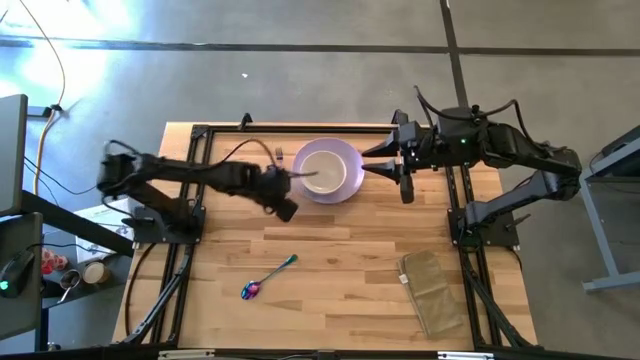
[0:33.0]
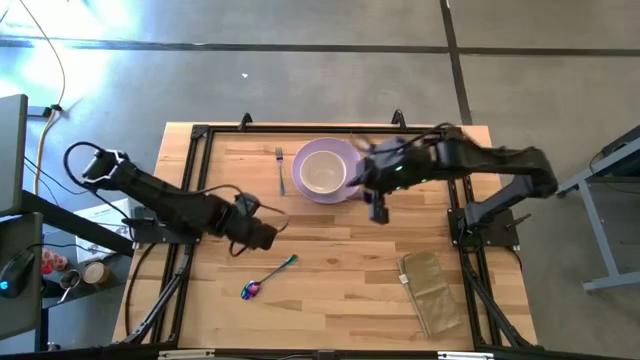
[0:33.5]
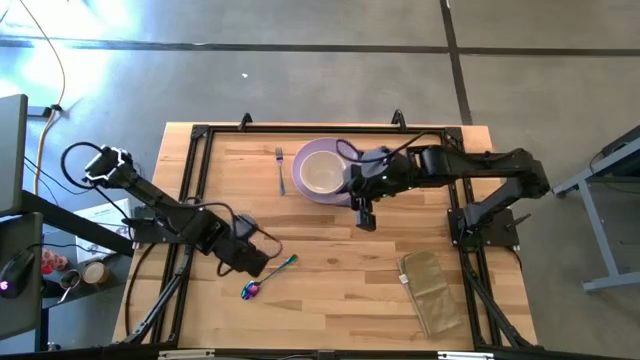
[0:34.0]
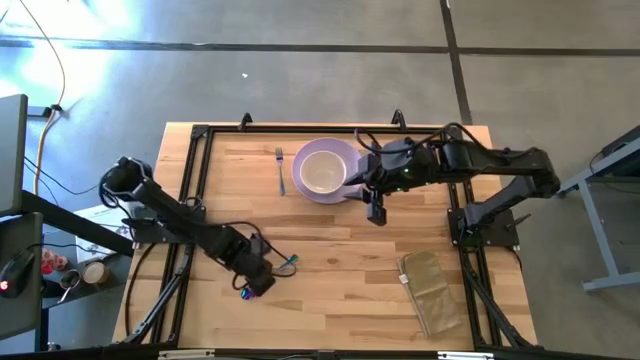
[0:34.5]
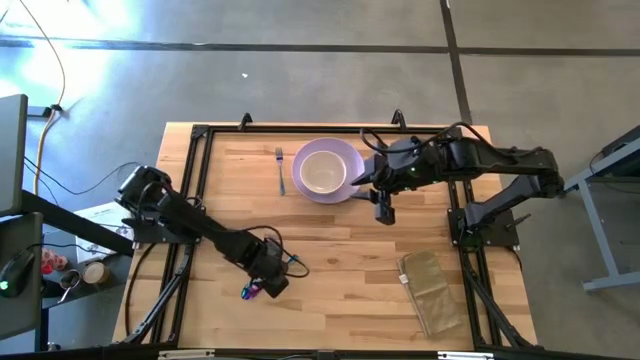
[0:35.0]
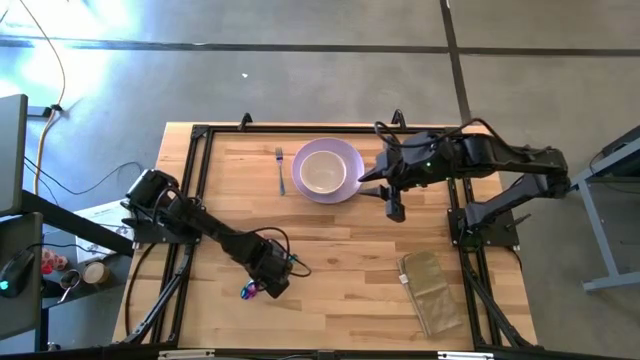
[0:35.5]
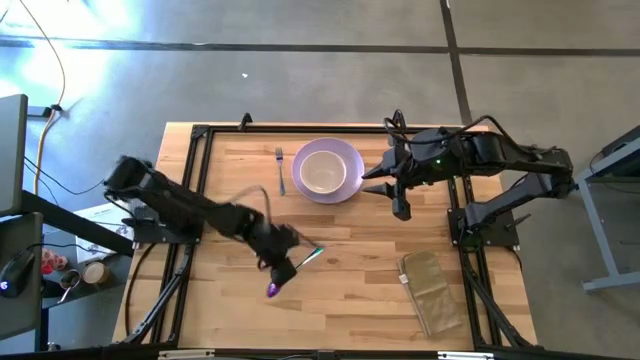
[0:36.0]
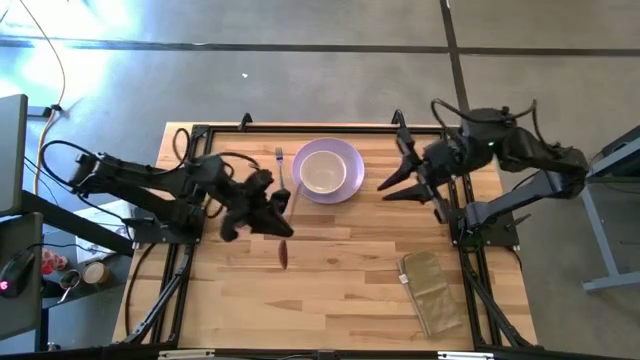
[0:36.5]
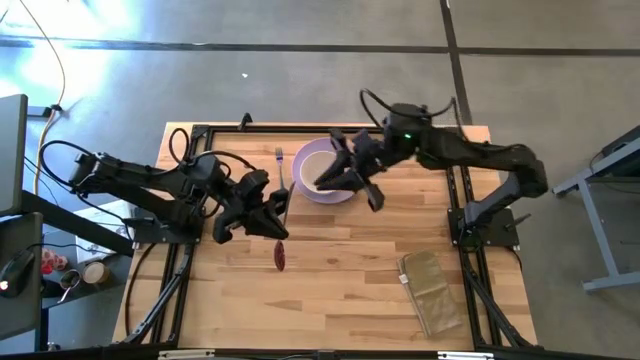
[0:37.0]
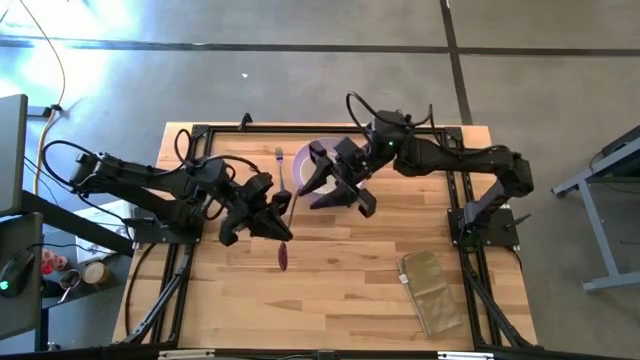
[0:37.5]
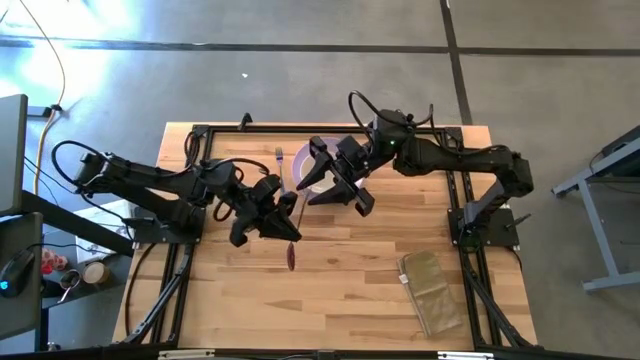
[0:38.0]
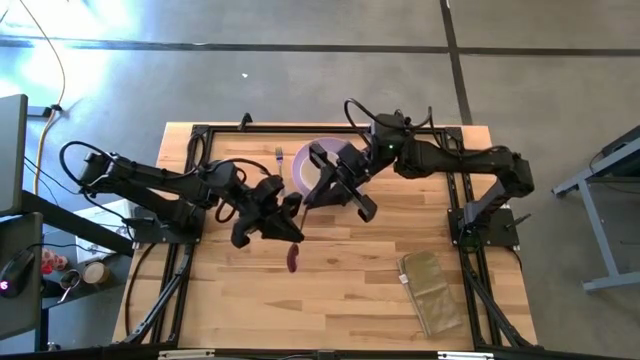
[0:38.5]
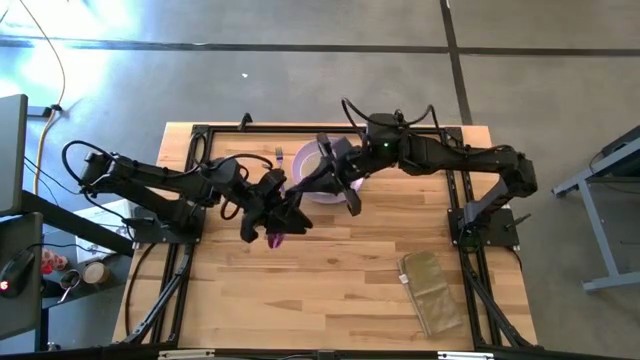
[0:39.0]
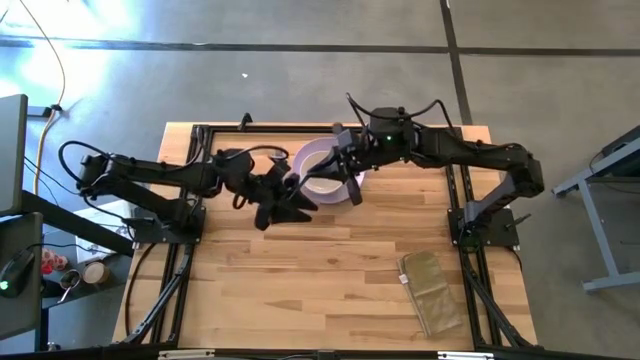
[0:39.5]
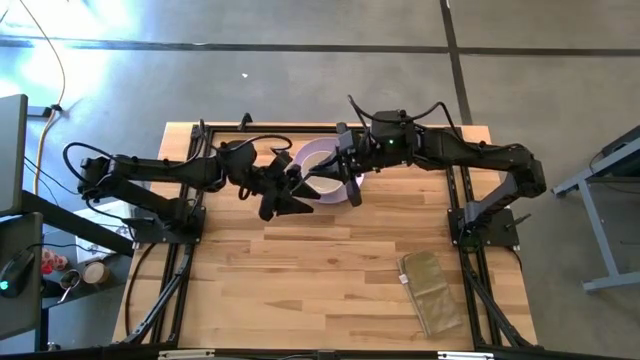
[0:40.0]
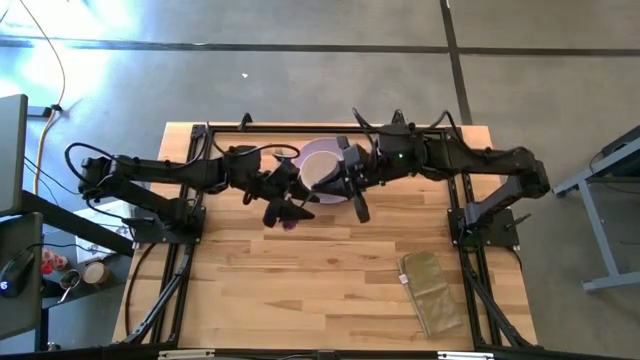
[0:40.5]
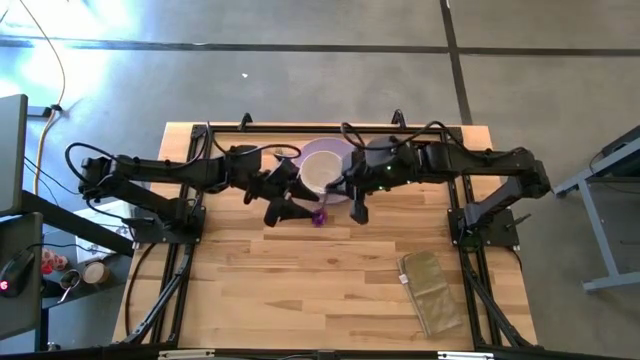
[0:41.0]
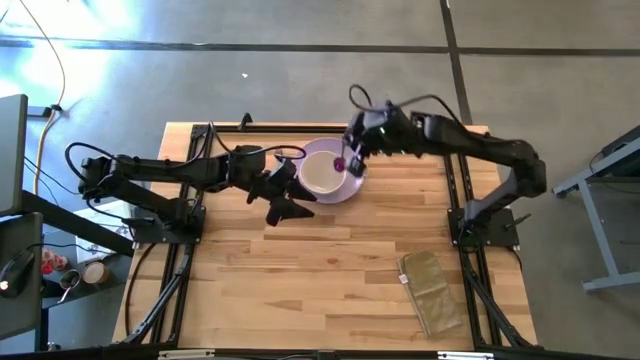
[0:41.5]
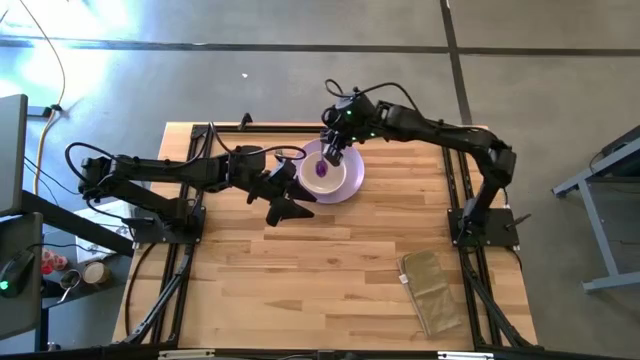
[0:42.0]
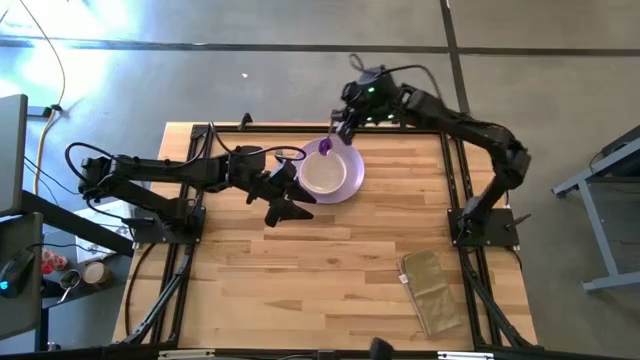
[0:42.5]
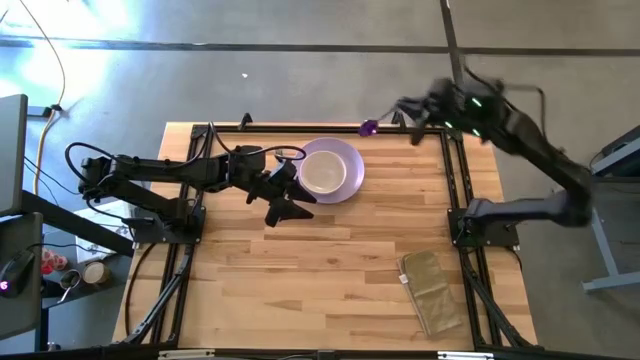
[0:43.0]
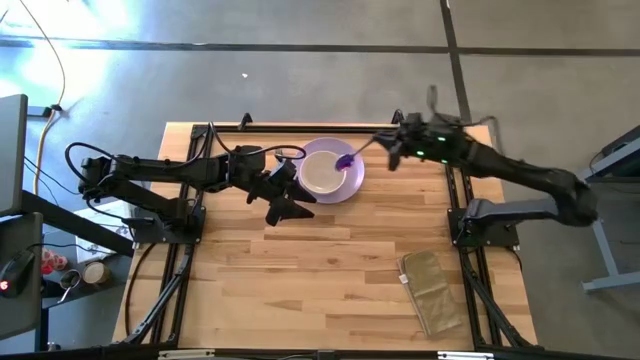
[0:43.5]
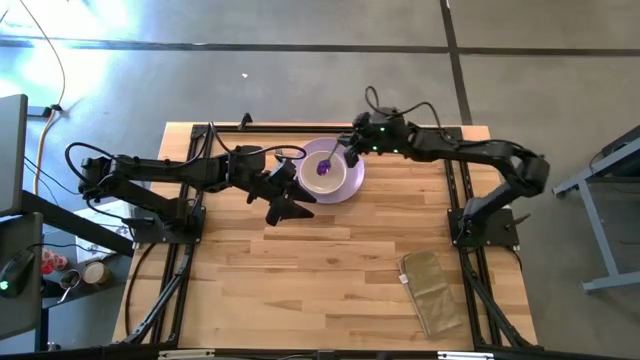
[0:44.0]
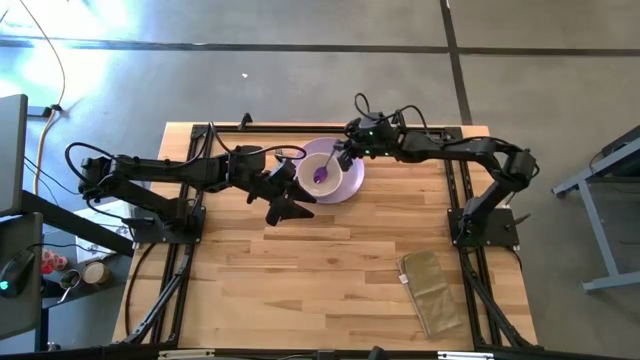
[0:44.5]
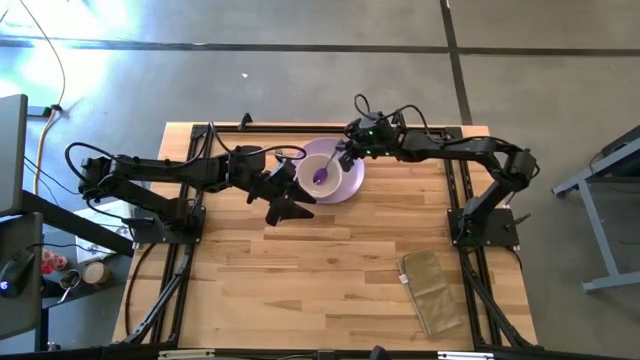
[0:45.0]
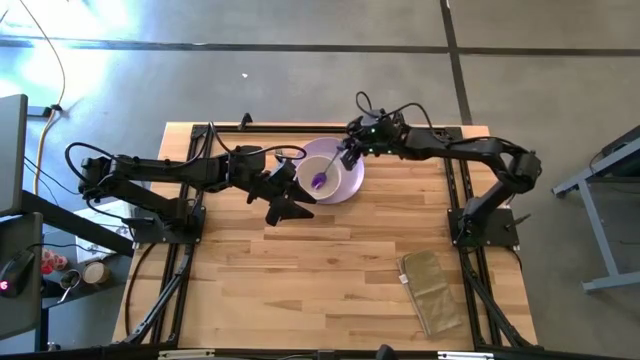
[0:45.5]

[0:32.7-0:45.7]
Task: Set table place
Put the violet spoon into the white bowl

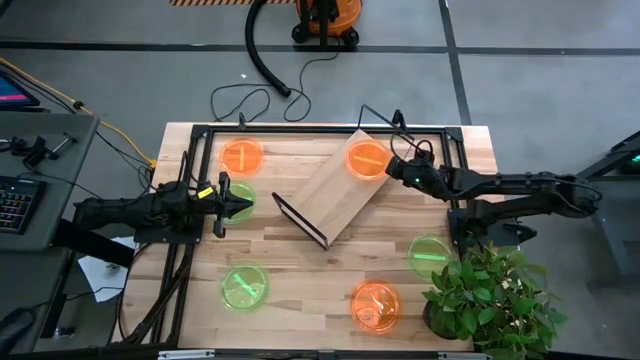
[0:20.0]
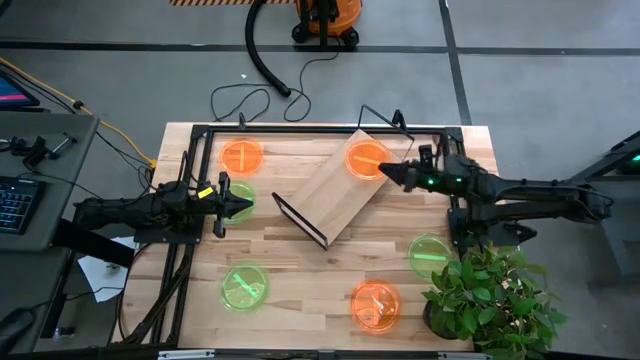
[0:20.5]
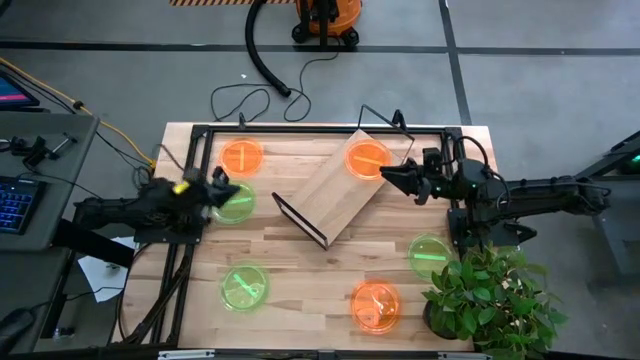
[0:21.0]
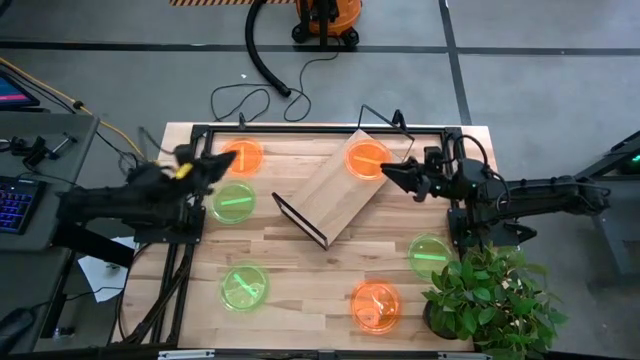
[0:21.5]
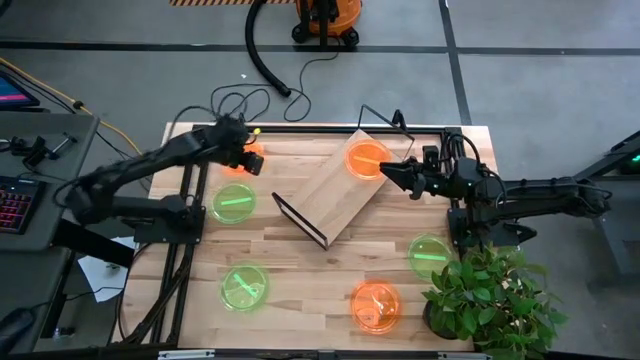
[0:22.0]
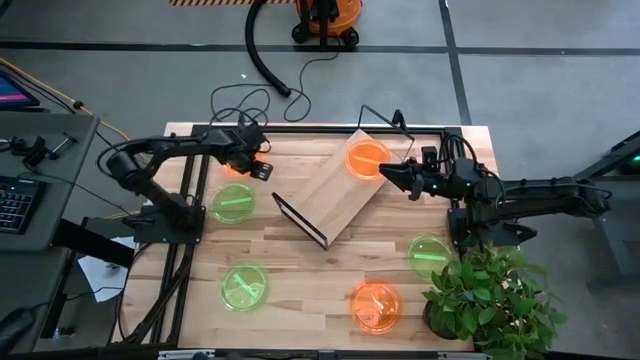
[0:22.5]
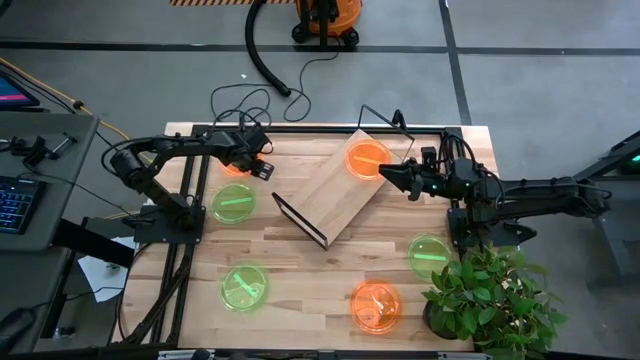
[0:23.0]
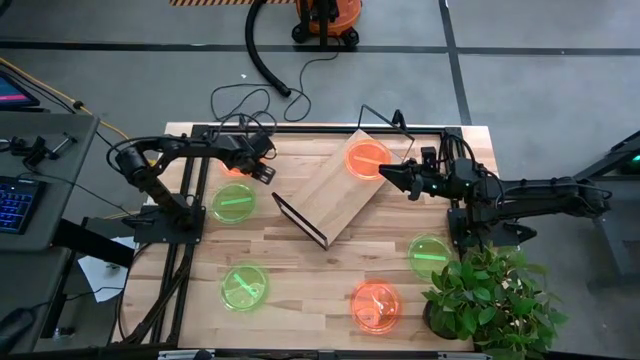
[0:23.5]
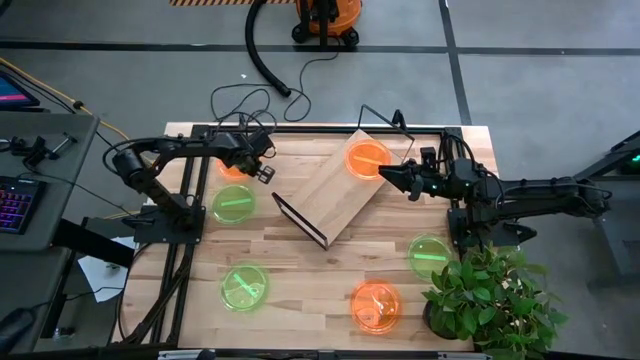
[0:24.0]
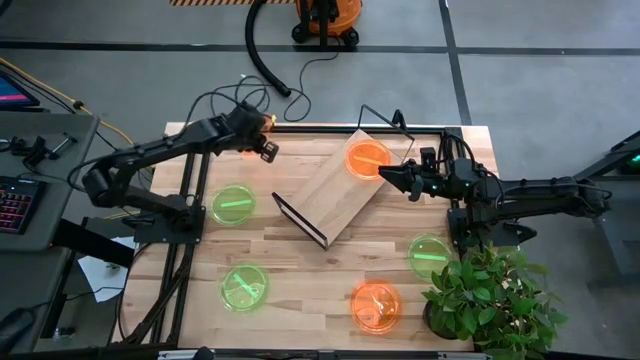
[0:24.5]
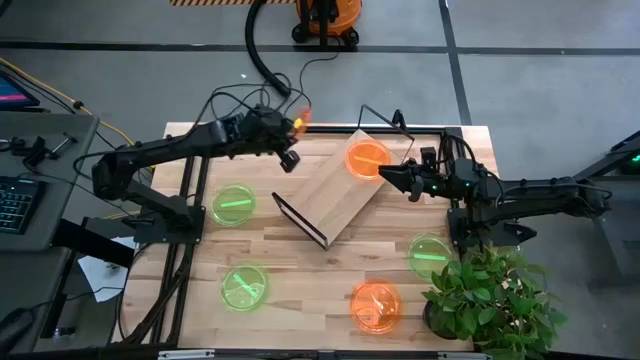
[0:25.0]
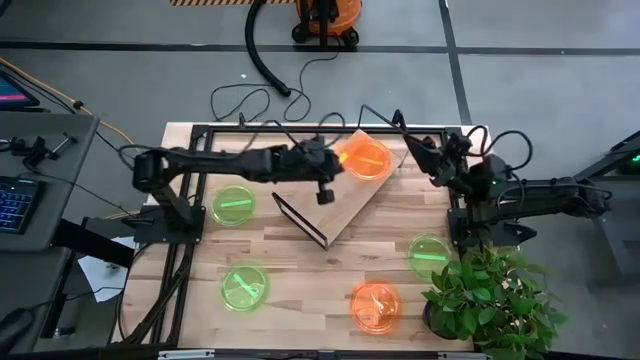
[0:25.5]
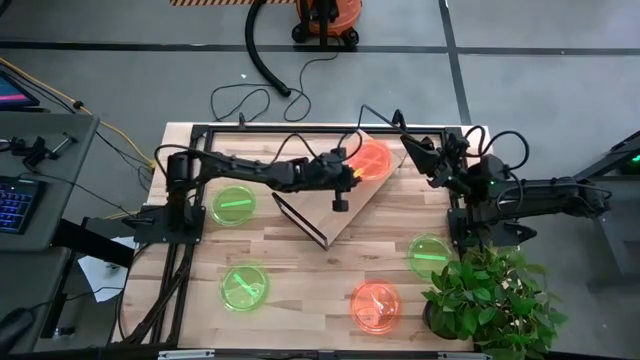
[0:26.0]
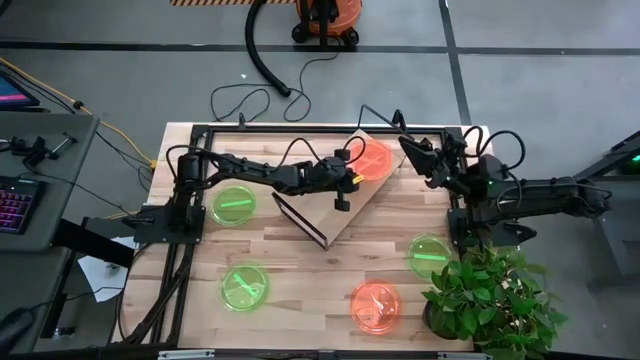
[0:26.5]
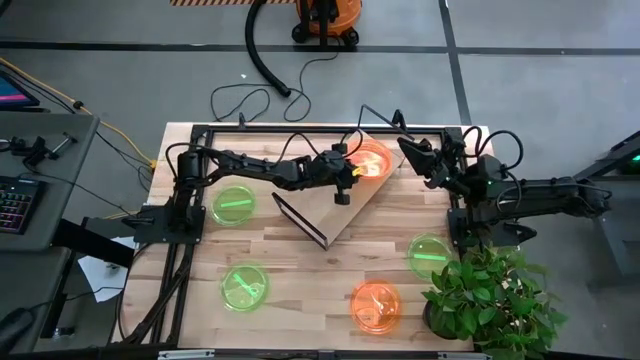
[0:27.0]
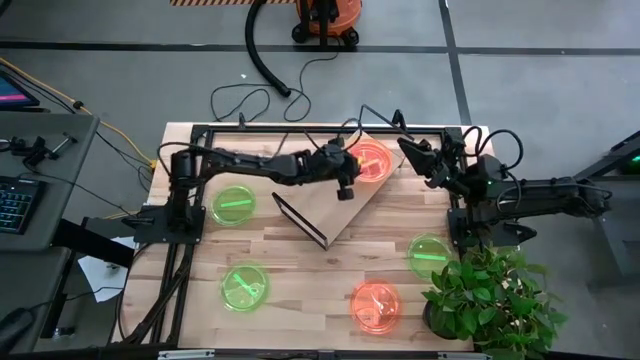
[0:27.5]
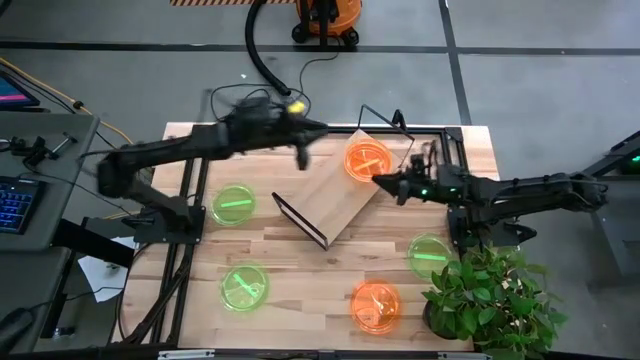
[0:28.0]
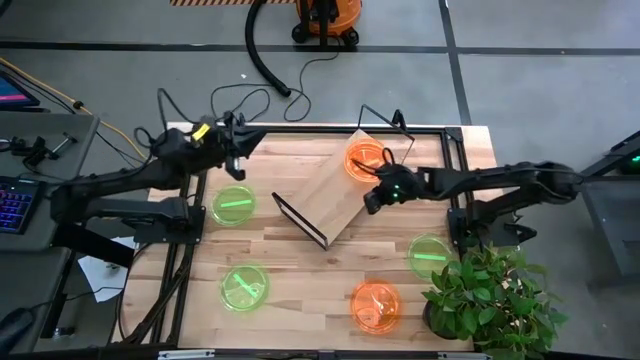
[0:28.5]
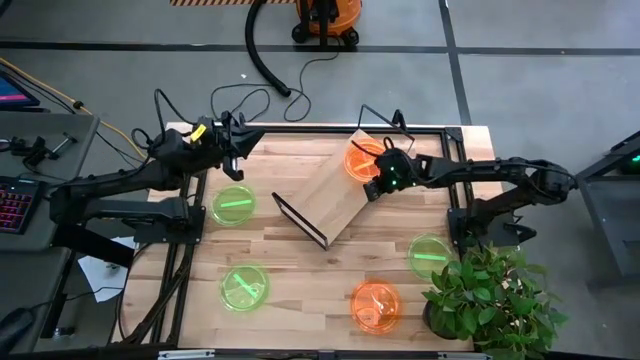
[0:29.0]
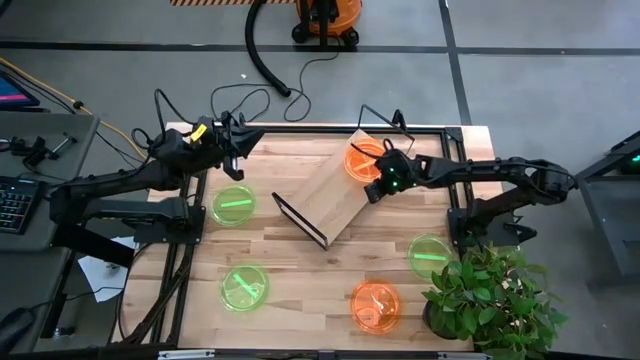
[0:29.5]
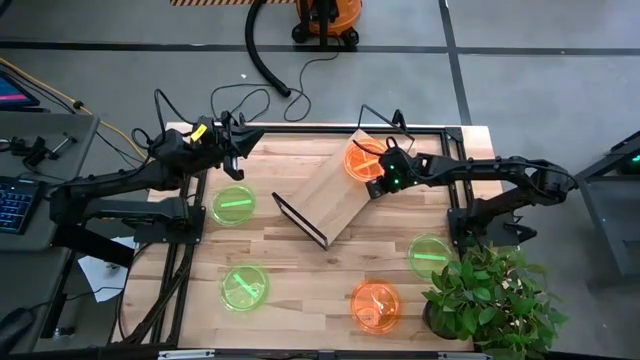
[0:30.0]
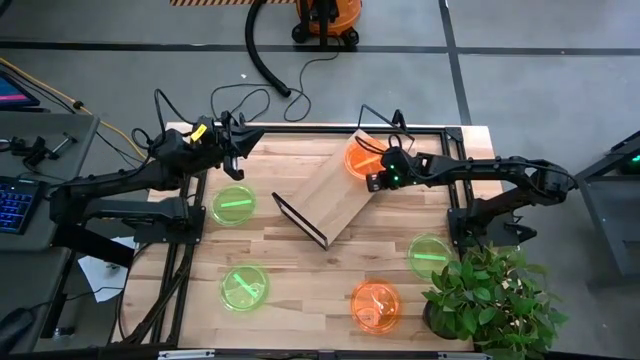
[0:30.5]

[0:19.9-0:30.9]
Task: Place and stack plates onto a shelf
Stack the top orange plate on top of the orange plate on the shelf
